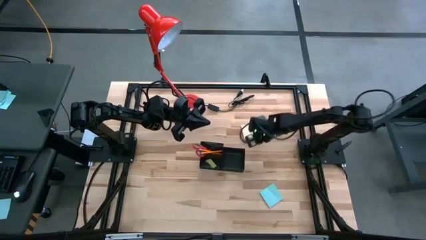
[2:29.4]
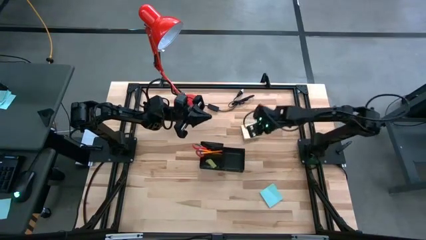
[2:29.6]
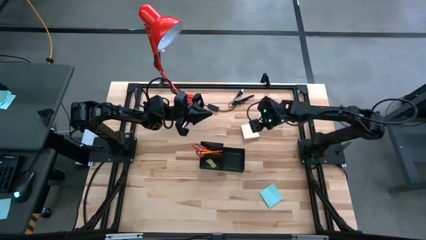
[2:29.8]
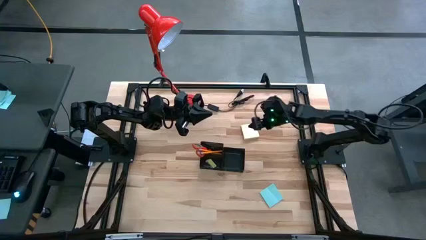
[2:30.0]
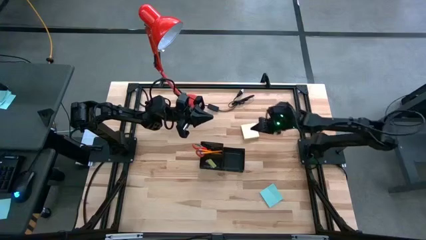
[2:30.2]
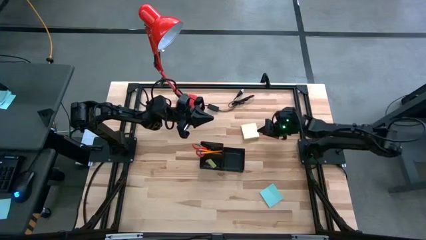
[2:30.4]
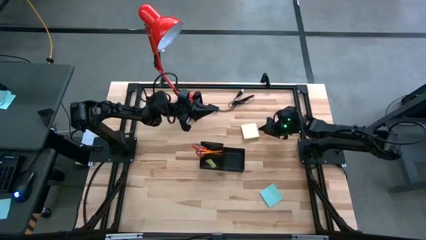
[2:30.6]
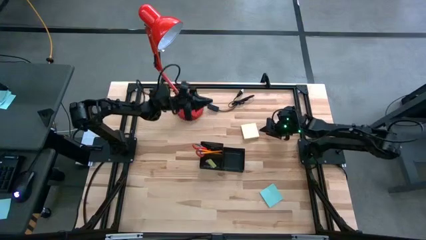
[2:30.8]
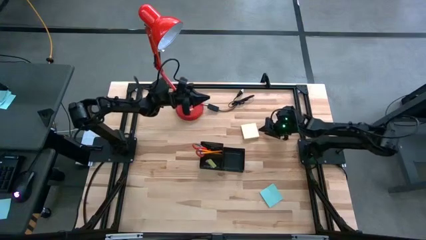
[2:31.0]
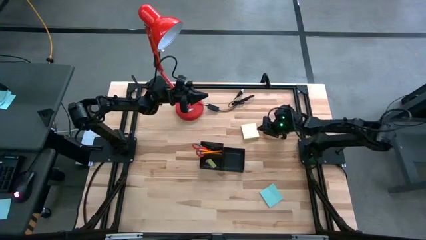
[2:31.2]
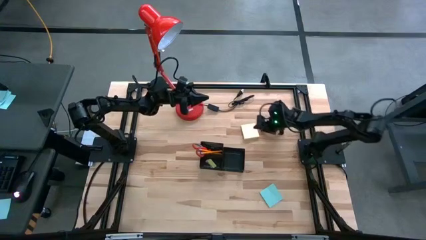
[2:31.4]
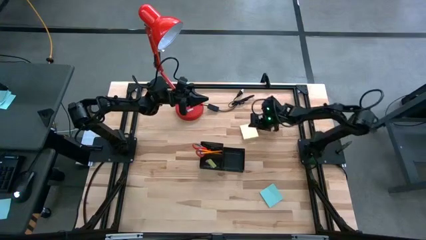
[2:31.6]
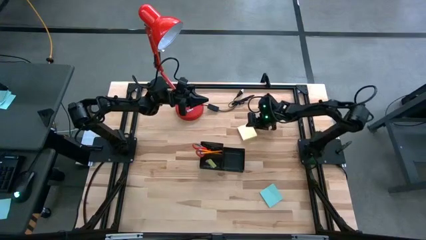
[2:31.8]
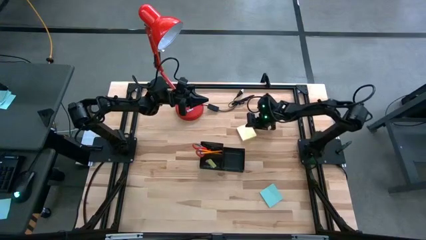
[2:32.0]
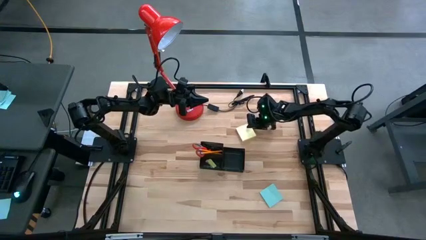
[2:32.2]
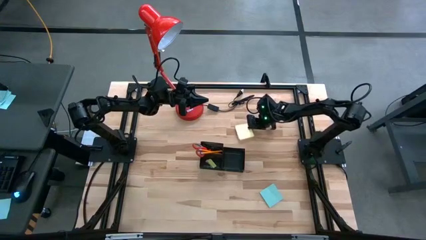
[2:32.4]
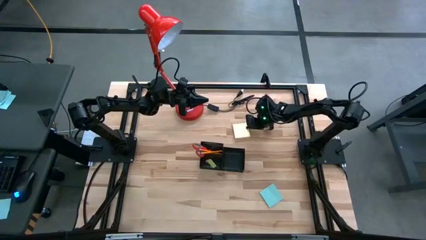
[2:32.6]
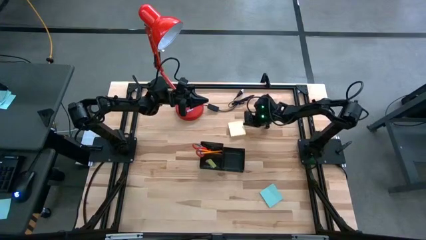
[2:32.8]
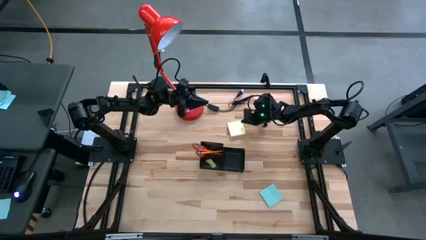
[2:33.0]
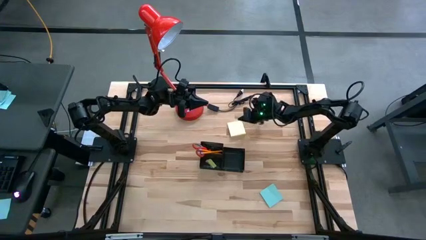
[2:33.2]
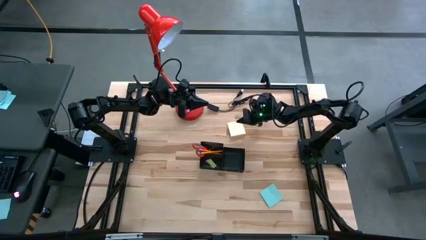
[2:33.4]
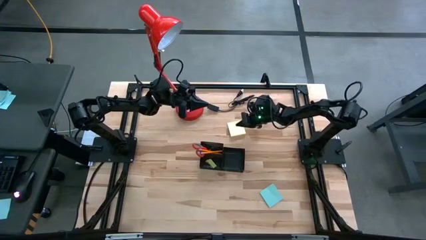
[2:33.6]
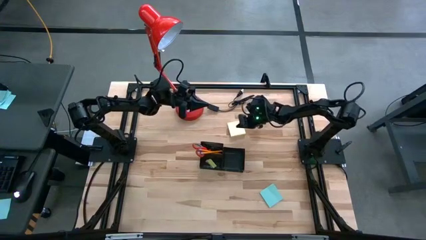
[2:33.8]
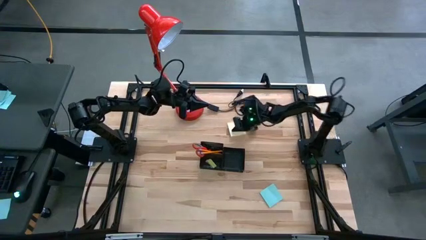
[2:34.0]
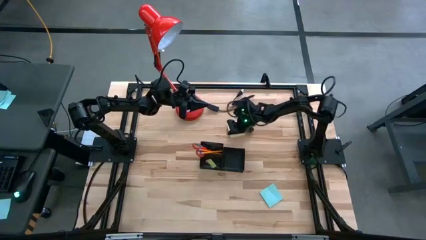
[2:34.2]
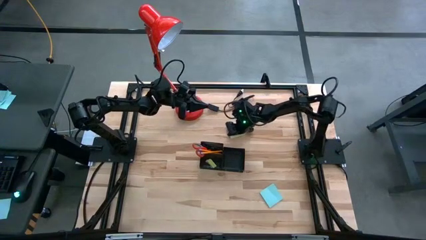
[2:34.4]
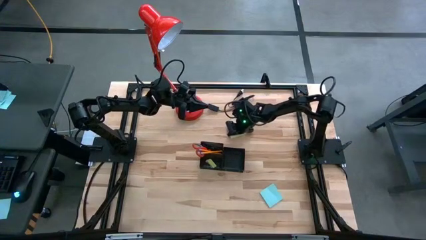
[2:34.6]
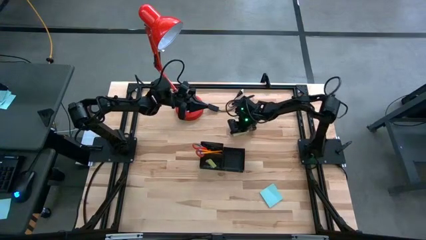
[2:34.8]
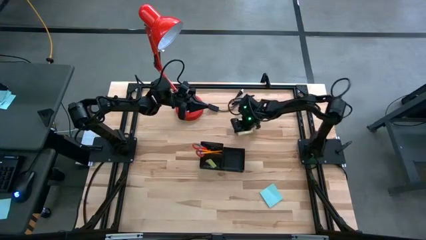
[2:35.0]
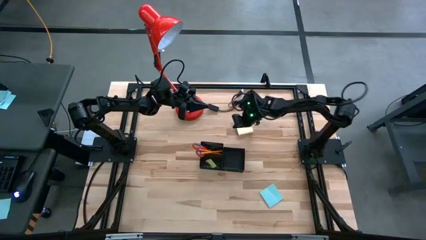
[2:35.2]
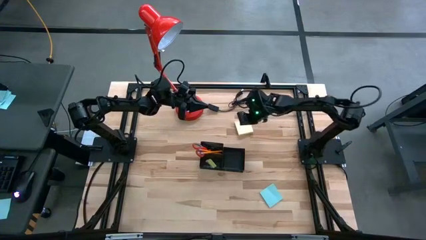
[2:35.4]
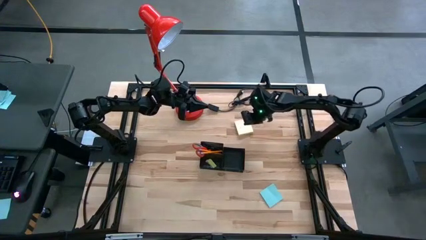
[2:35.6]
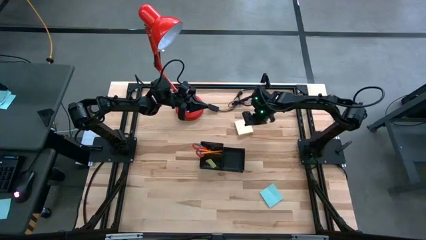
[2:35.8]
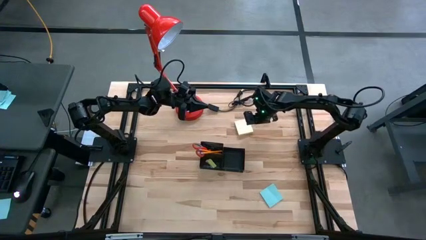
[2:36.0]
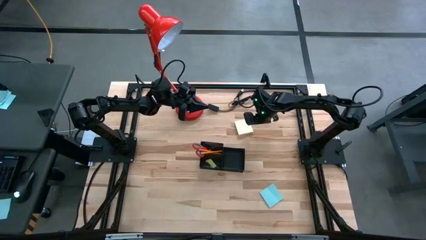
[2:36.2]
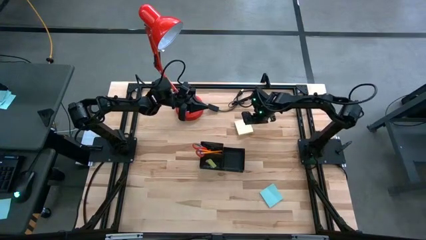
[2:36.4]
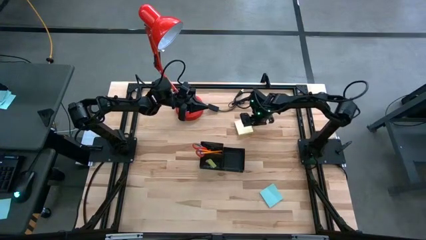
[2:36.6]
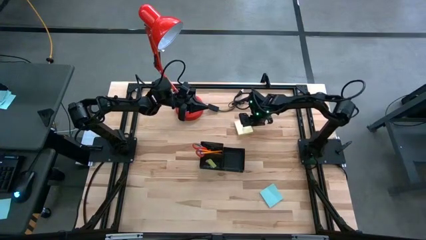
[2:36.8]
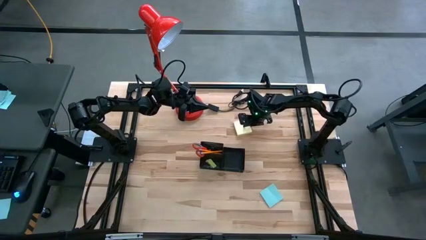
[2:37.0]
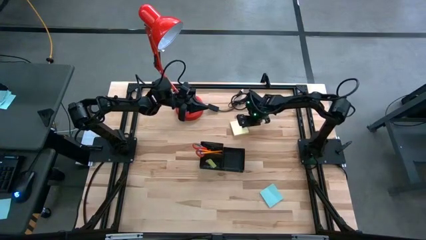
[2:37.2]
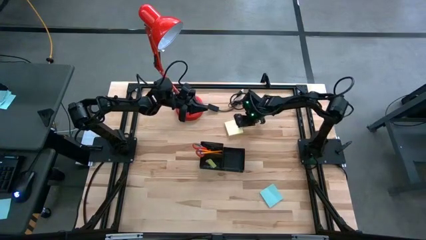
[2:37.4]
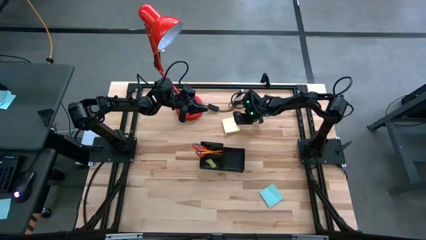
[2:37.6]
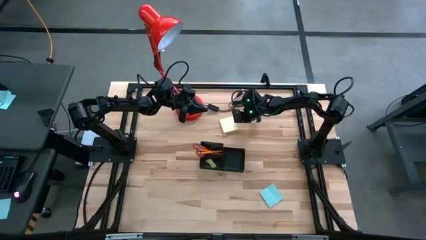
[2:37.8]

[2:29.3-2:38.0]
Task: Pick and place office supplies into organizer
Put the yellow sticky notes into the black desk organizer

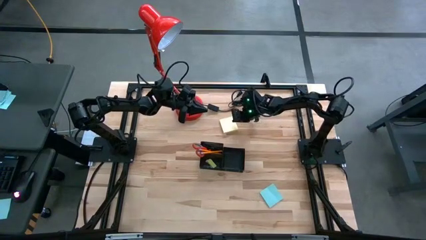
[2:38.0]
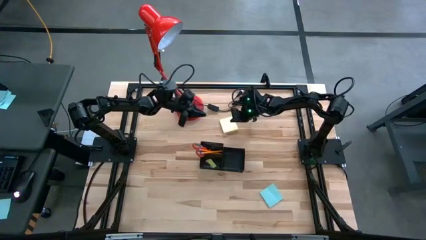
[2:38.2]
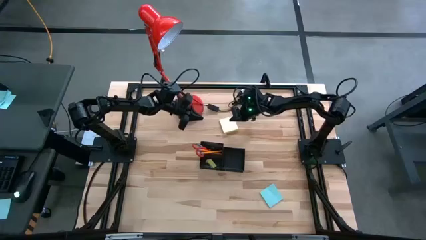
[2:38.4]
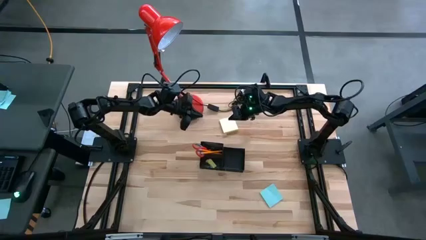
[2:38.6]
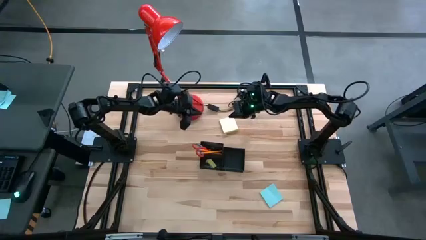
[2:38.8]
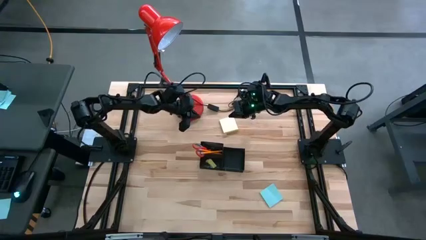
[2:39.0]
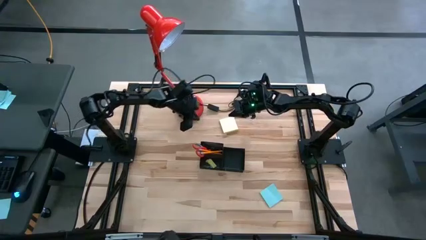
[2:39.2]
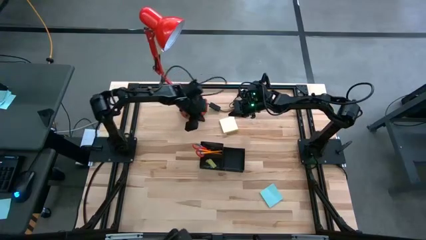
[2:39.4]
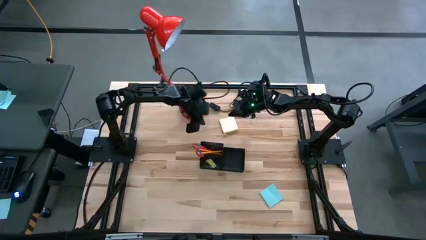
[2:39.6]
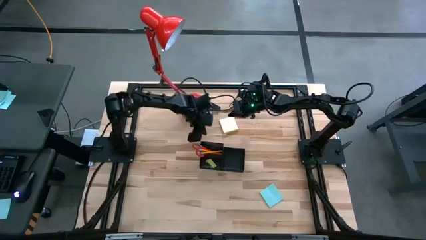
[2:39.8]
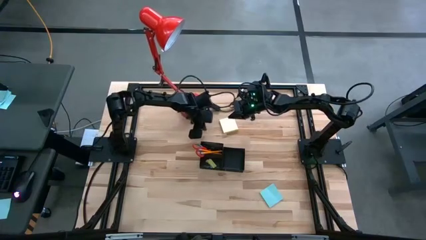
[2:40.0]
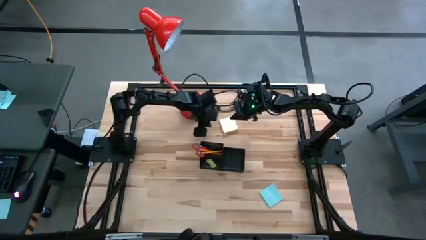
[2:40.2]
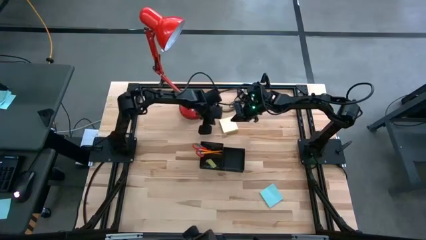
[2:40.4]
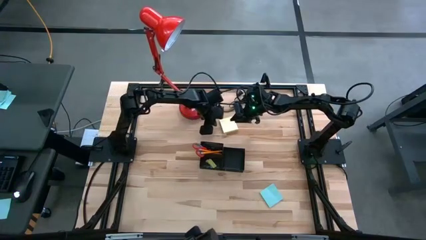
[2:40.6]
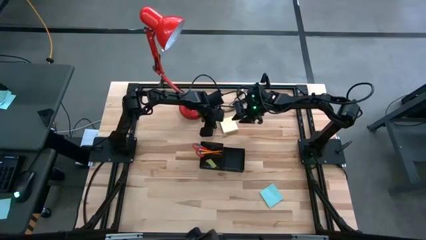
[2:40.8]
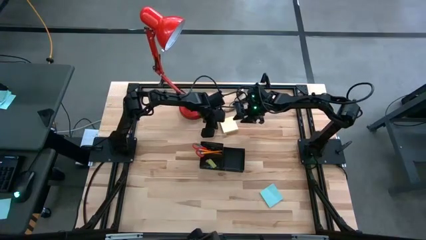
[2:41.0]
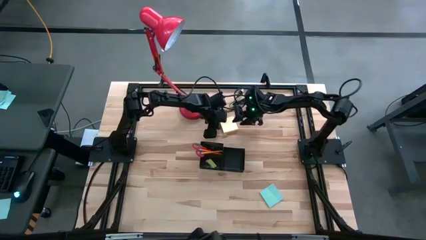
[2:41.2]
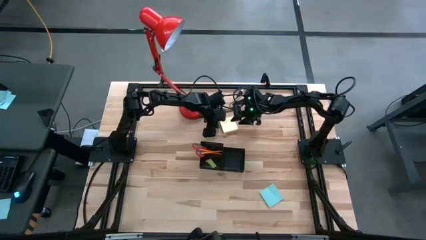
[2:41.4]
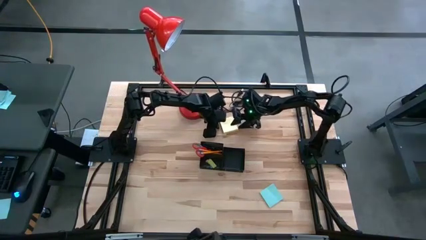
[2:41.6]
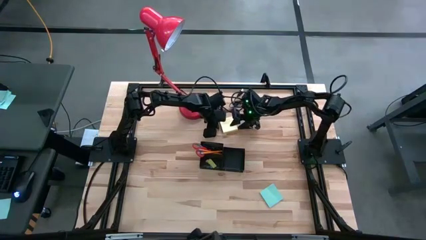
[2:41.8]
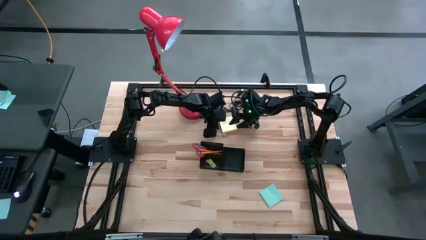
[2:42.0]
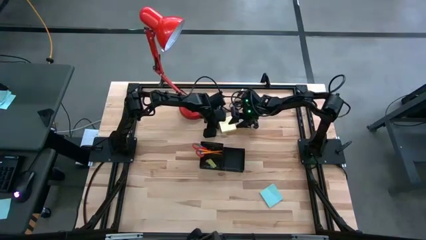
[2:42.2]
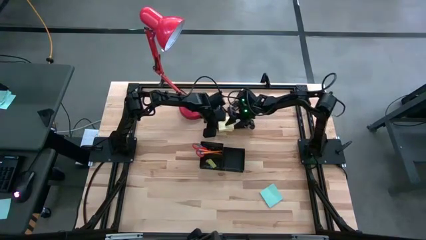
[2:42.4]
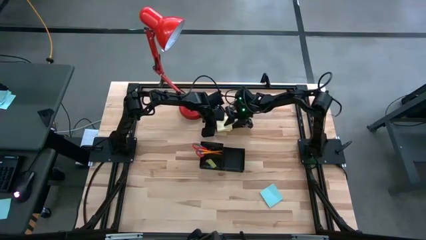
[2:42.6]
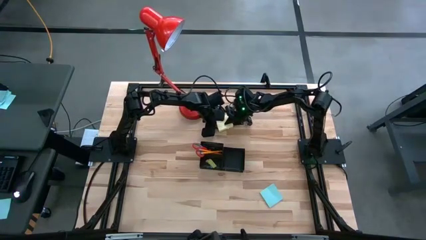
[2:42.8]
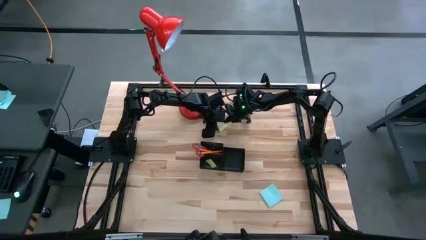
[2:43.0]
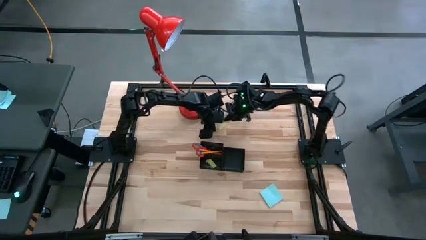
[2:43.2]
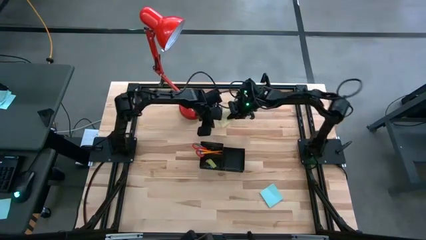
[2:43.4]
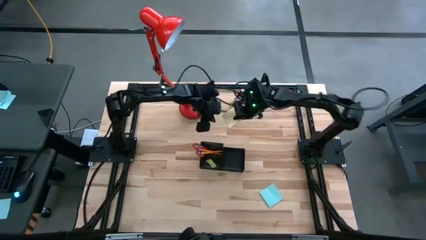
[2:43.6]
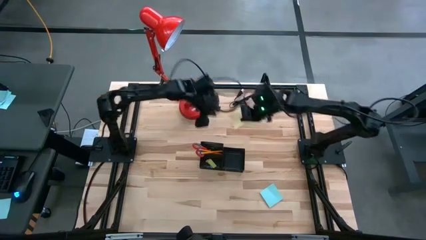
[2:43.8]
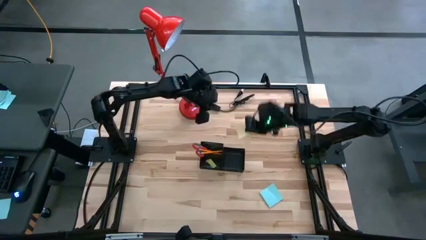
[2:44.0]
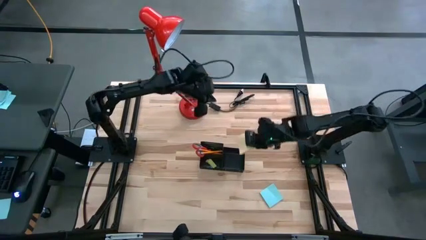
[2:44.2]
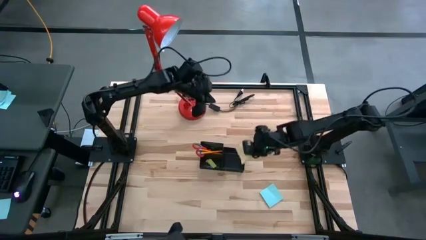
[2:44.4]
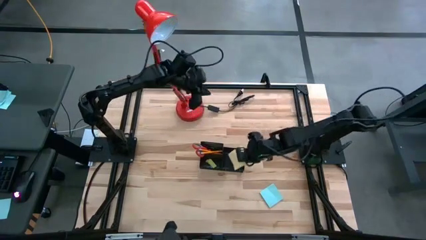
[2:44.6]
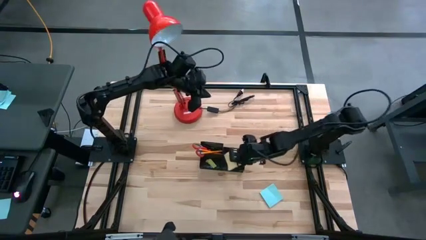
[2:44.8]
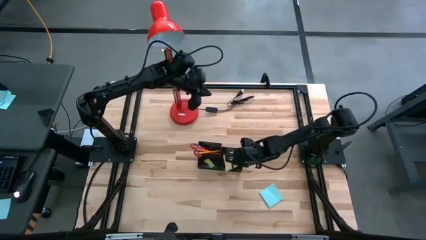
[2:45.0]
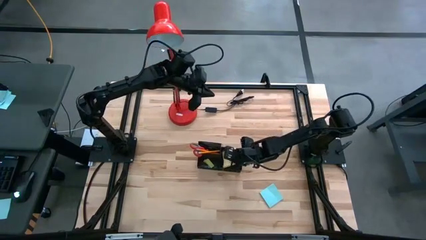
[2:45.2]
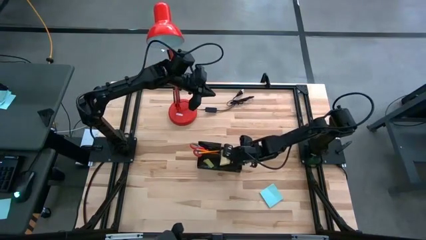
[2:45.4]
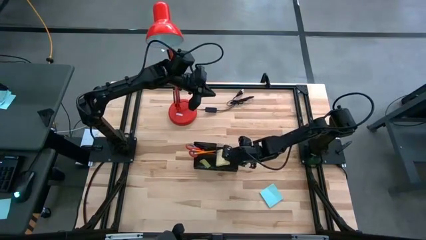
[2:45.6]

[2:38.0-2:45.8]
Put the yellow sticky notes into the black desk organizer
